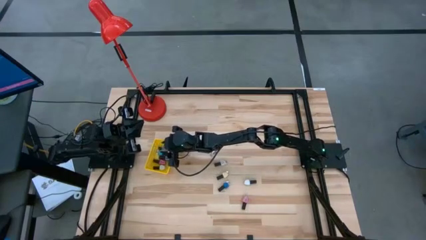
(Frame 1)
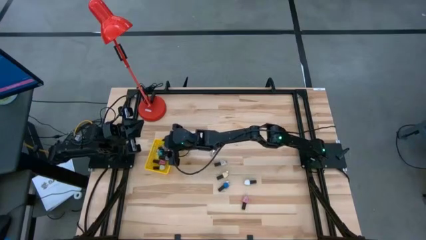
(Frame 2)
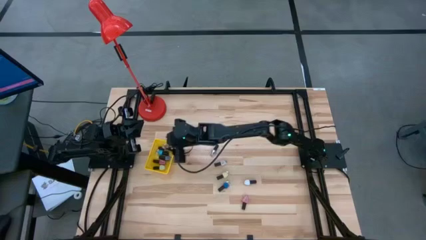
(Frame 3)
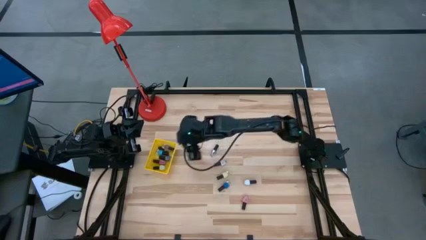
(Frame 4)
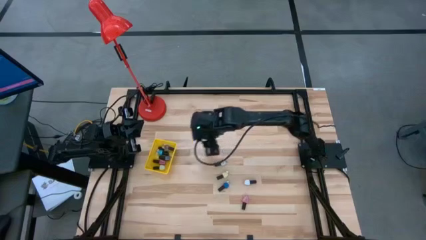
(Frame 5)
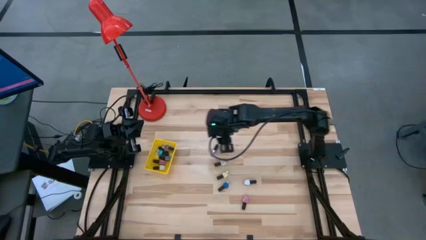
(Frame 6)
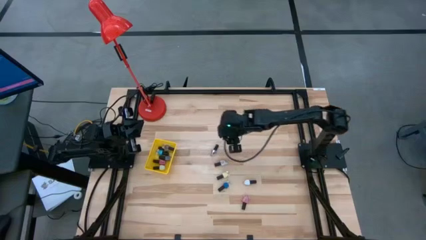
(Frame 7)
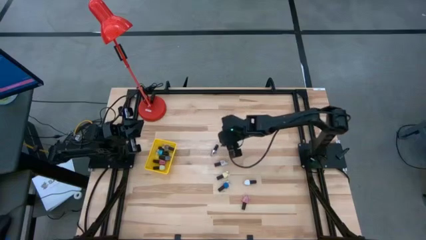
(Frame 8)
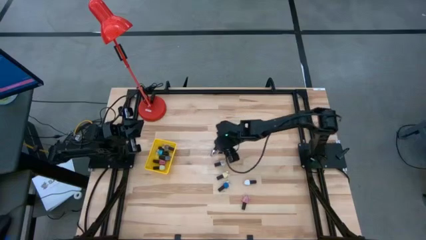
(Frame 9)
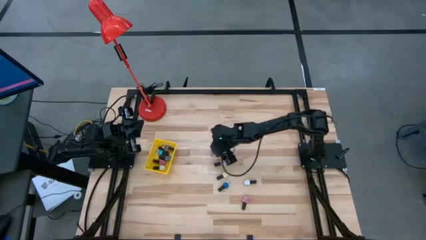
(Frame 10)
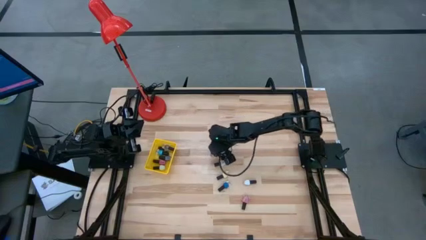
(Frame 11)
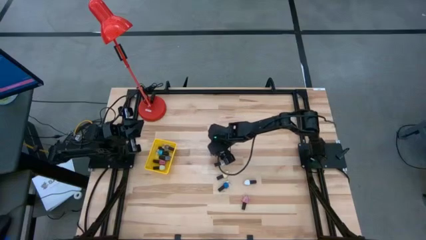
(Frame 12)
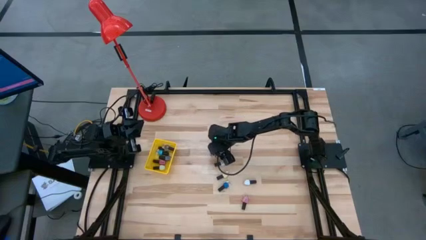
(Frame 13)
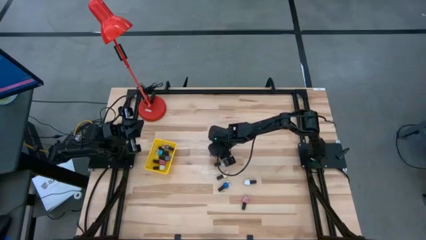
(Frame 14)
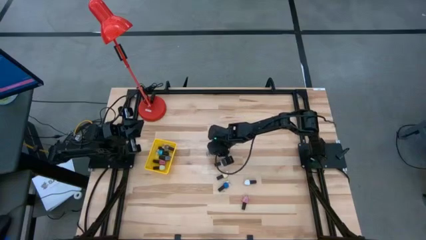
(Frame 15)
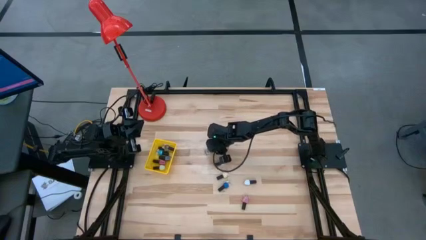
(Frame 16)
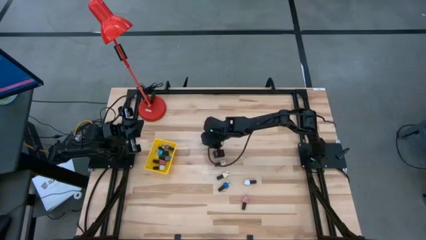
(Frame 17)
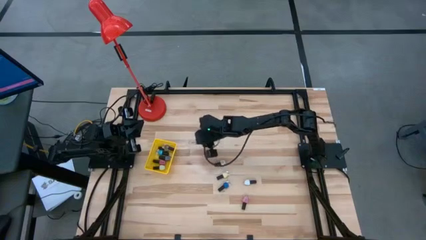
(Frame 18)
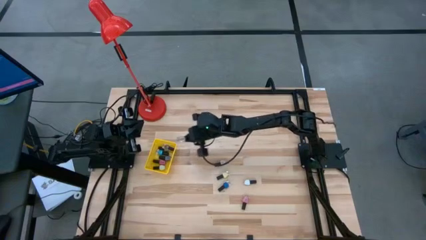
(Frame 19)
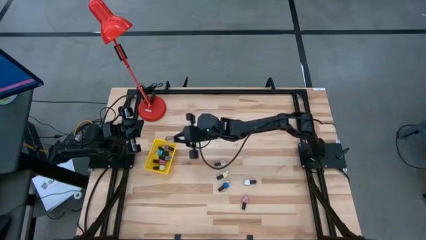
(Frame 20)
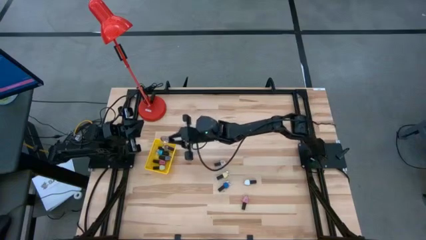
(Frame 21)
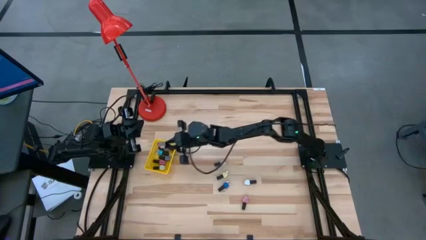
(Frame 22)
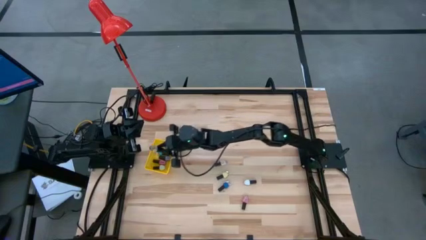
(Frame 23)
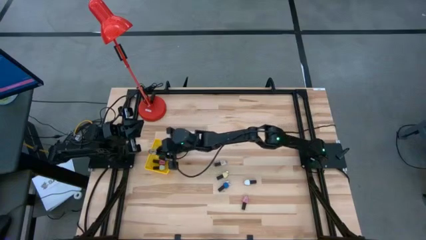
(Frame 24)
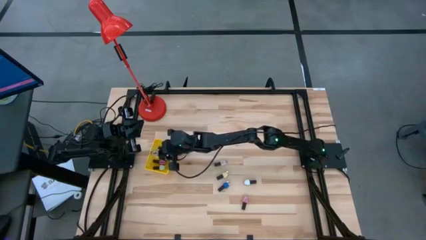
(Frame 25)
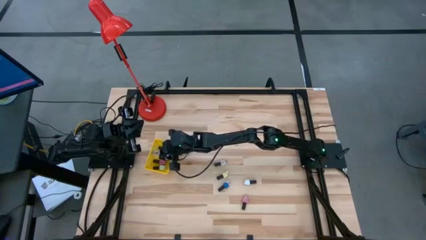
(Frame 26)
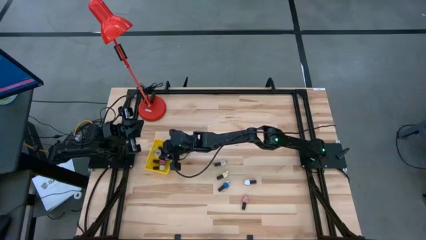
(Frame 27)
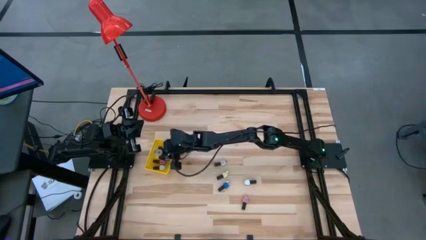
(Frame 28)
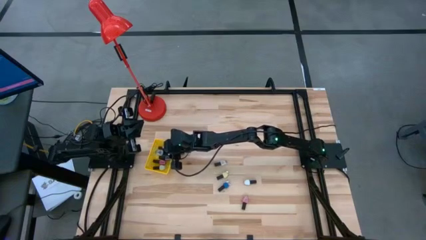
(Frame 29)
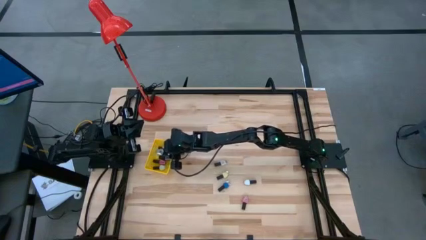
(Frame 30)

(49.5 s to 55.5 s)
Task: Pick & Place Nail Polish
Put the transparent nail polish bottle into the yellow basket

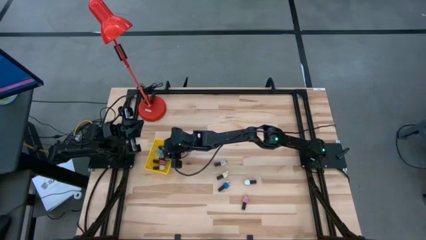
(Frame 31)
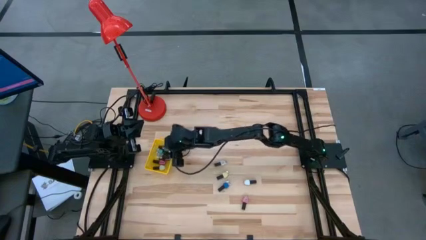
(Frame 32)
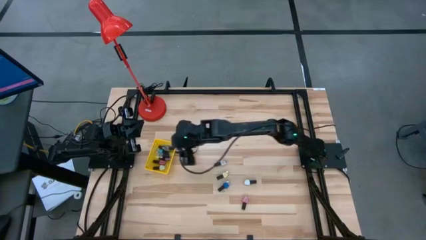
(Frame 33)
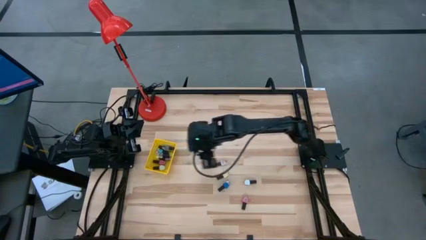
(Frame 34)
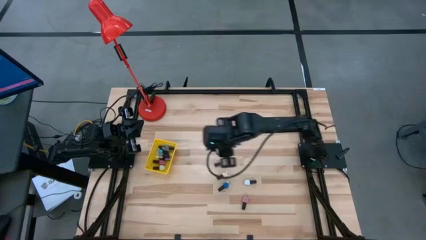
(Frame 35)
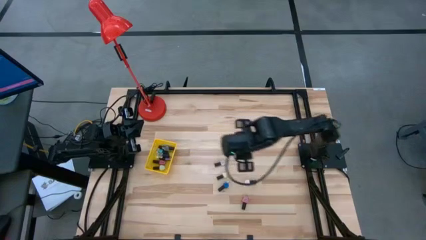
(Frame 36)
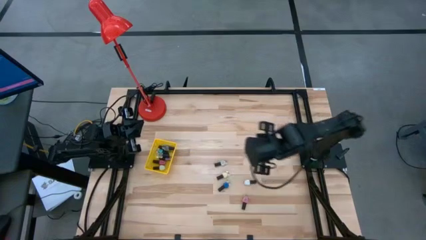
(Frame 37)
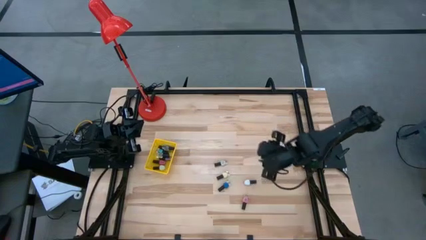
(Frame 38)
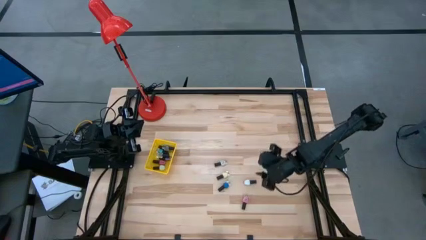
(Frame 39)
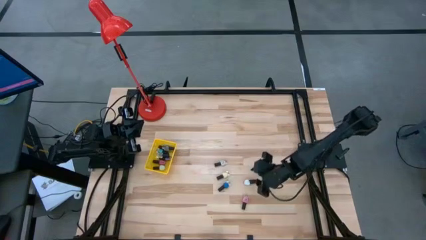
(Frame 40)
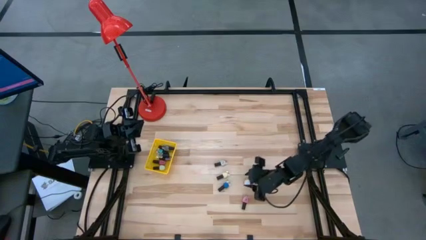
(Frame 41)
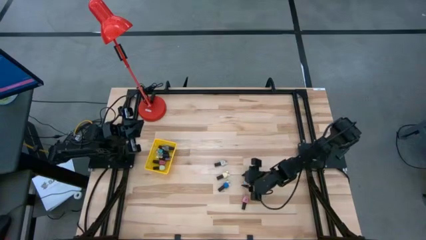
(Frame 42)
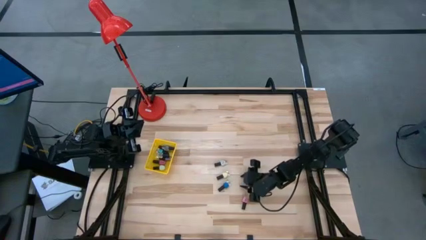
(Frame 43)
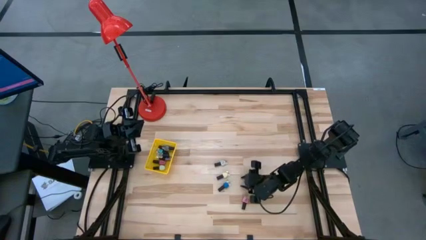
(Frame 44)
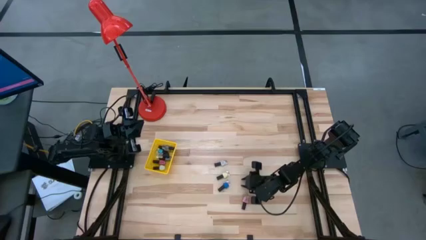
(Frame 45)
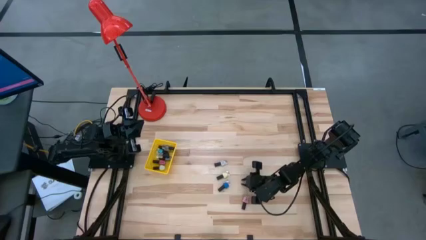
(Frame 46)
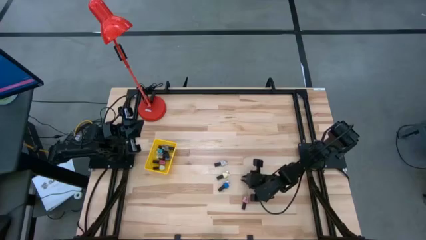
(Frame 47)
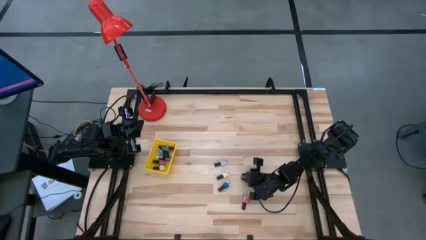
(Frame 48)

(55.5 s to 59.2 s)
Put the bottom white nail polish bottle into the yellow basket

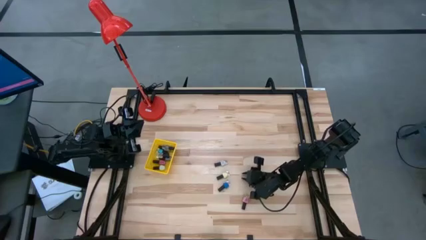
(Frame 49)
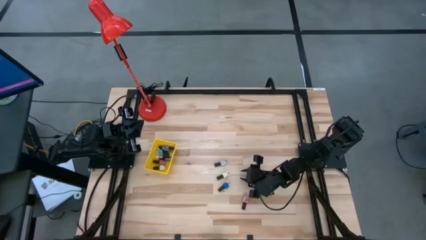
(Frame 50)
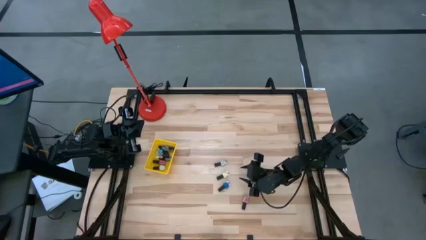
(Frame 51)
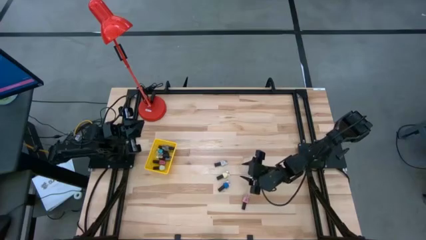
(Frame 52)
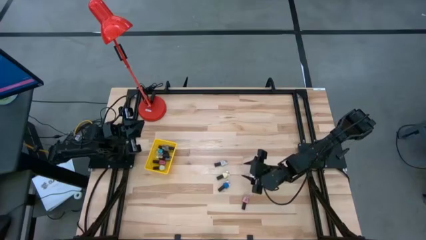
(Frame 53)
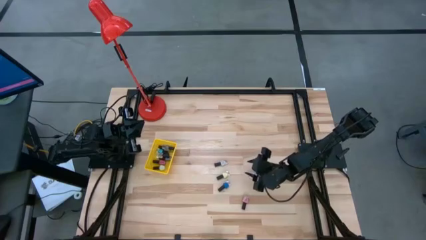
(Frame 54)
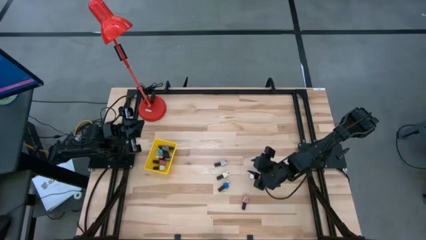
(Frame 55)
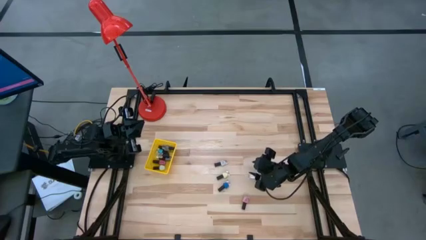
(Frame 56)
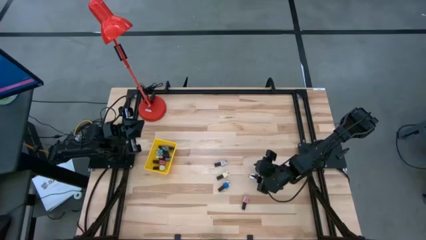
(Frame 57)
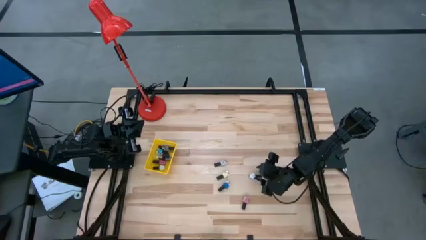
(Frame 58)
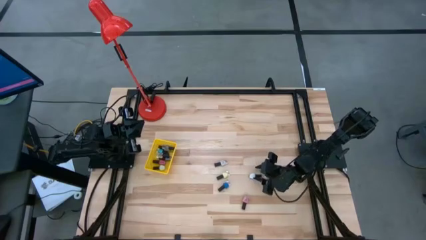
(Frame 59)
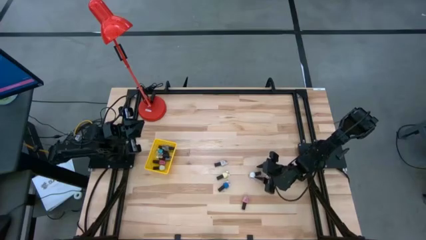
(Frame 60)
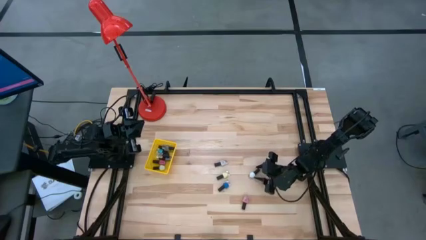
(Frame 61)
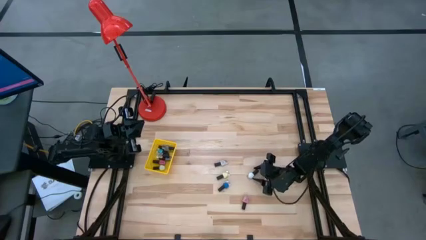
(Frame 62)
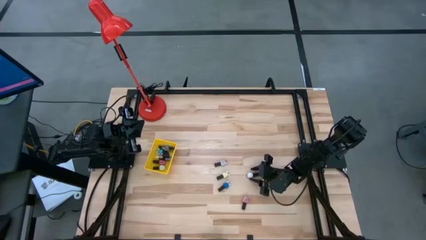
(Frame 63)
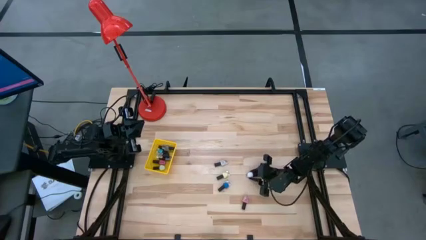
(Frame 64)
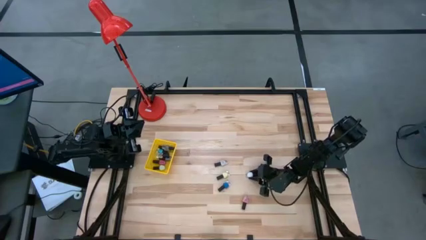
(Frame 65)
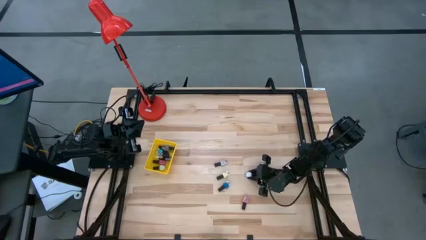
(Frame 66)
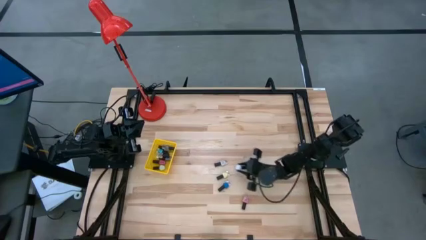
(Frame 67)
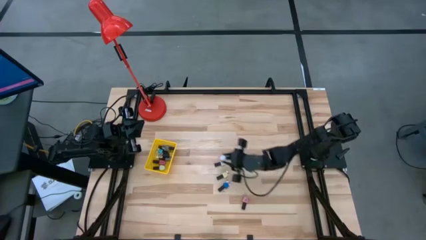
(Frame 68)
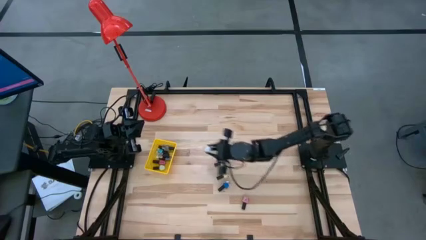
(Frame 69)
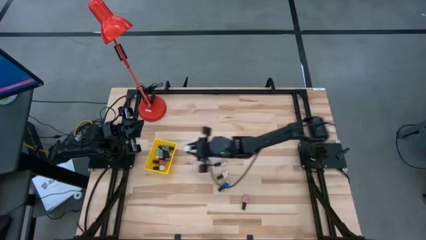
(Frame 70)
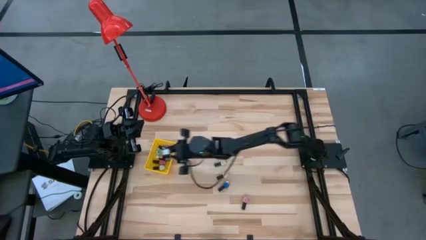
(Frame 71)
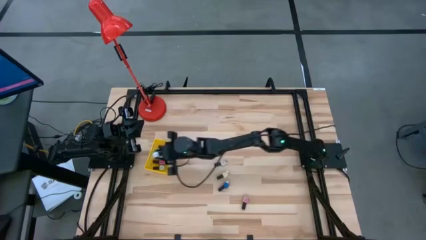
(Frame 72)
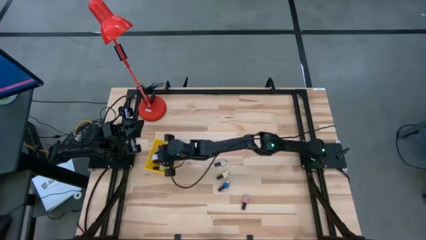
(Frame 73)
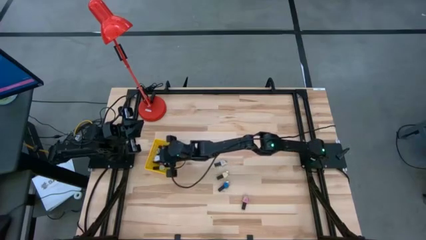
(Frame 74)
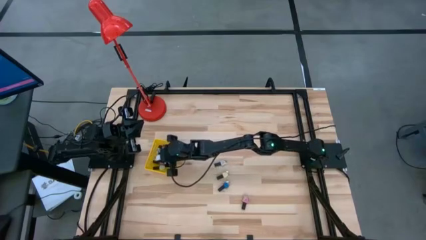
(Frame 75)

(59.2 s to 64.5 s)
Put the bottom white nail polish bottle into the yellow basket

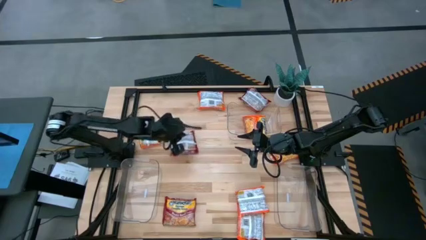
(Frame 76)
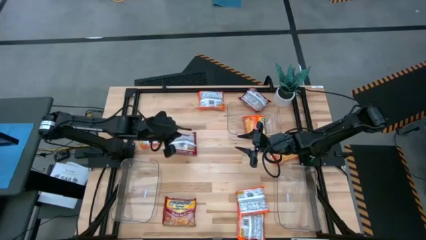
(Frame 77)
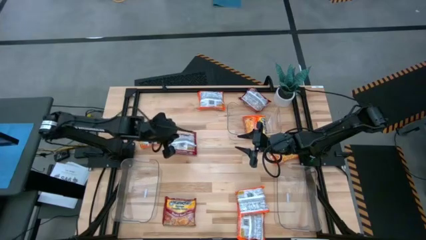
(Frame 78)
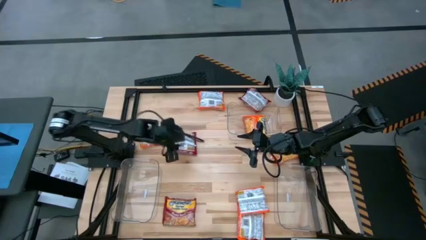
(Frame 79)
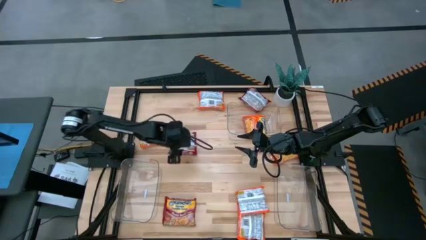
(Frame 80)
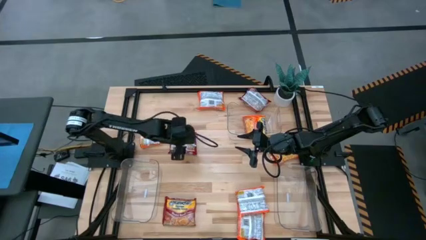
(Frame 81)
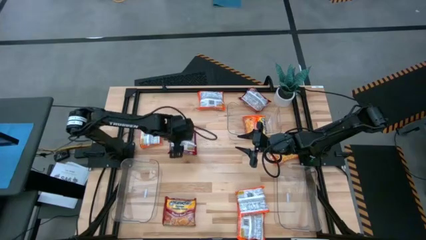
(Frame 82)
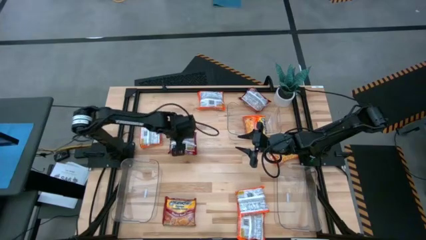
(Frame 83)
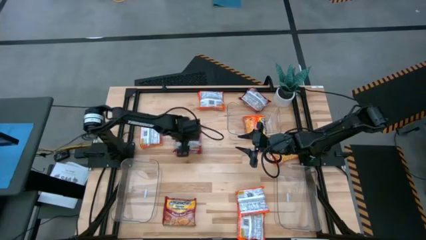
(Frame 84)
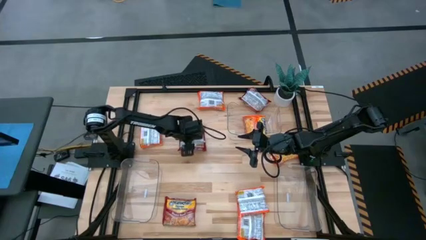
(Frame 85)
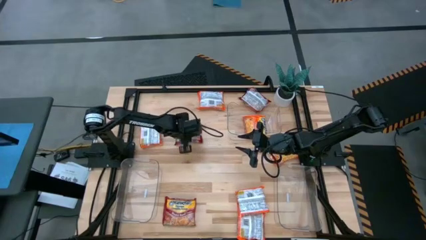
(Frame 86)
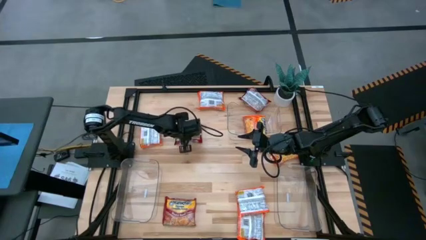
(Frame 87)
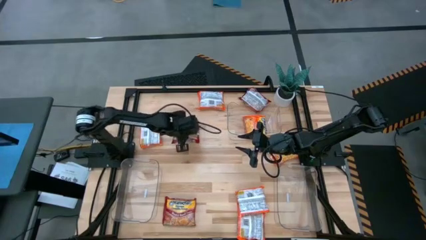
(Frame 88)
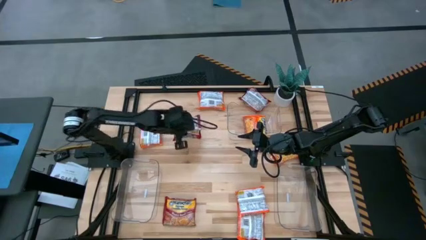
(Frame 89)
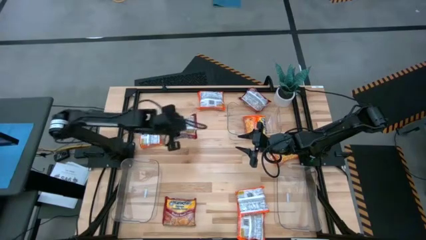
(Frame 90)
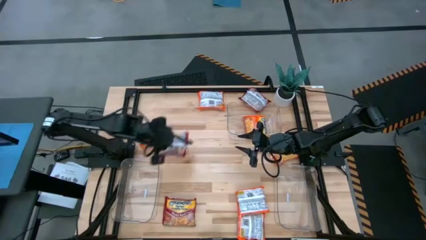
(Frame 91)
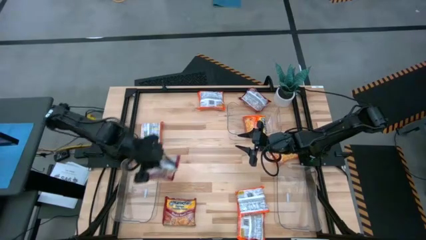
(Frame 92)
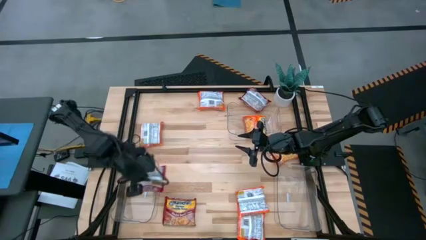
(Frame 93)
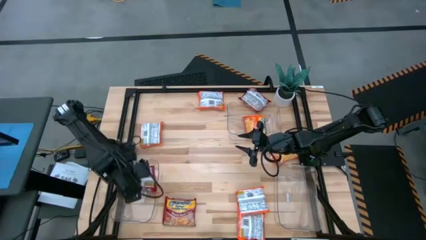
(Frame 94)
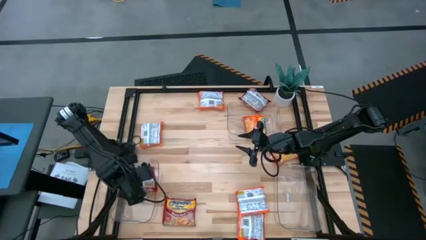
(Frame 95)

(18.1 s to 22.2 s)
Task: Sort Maruchan noodles
Put the red noodle pack into the bottom left transparent bin
